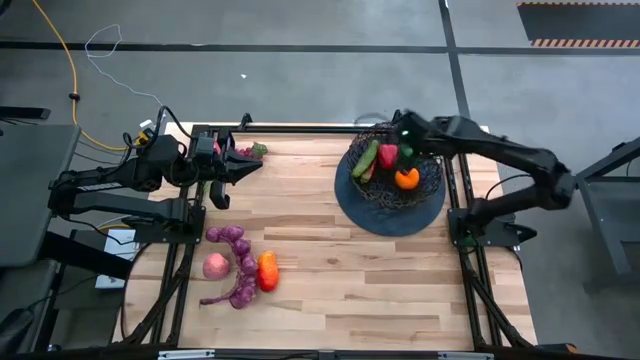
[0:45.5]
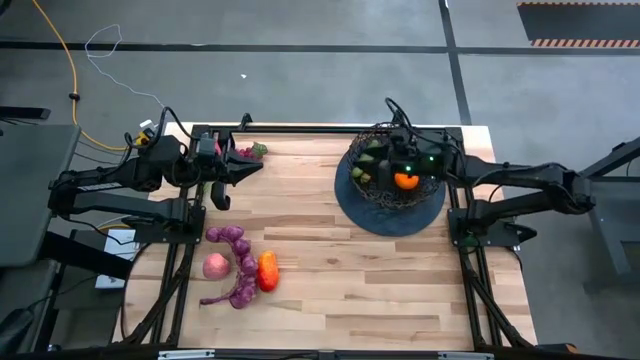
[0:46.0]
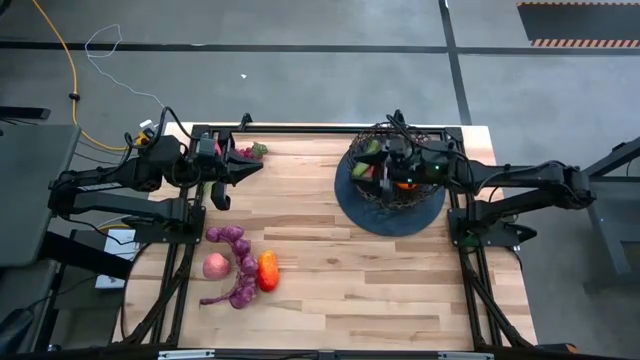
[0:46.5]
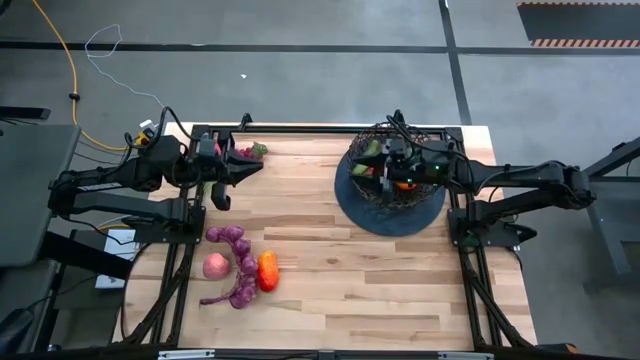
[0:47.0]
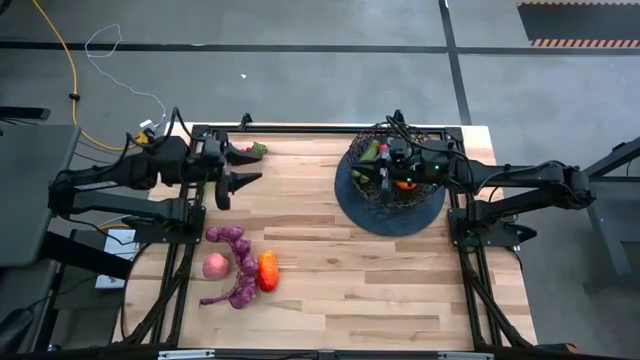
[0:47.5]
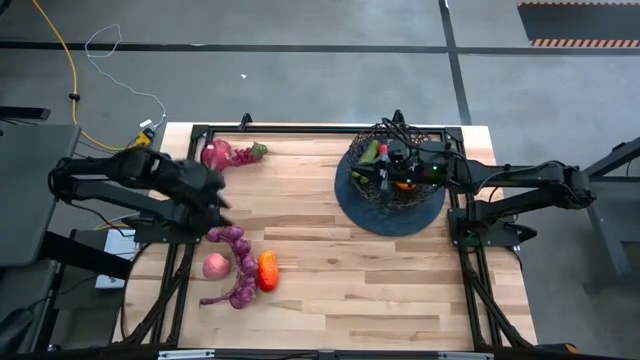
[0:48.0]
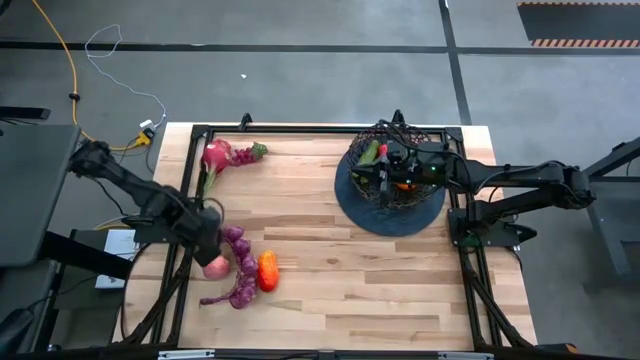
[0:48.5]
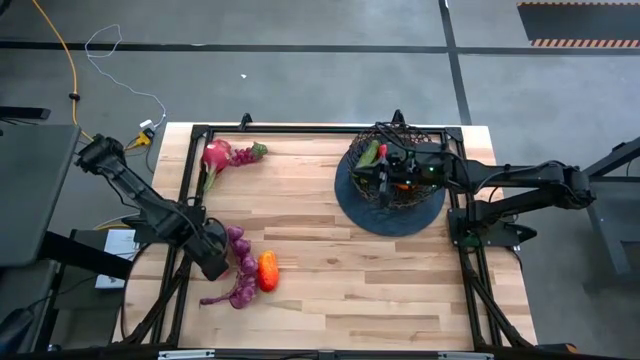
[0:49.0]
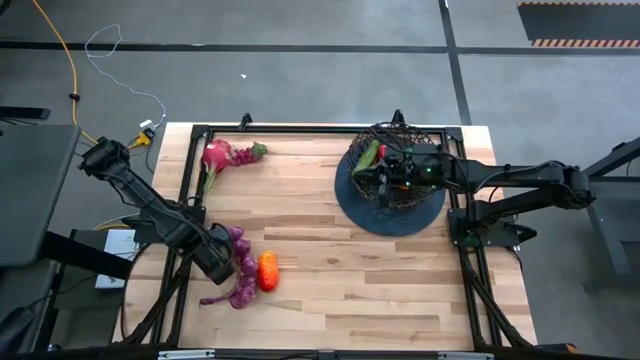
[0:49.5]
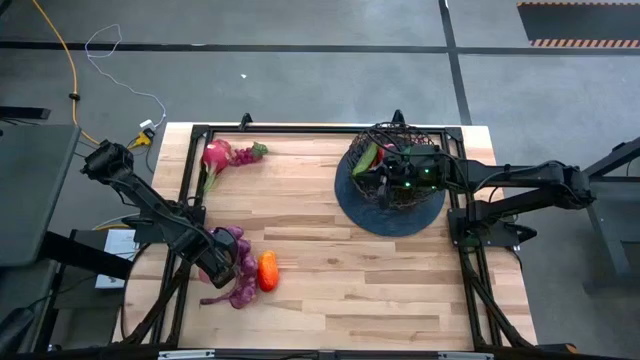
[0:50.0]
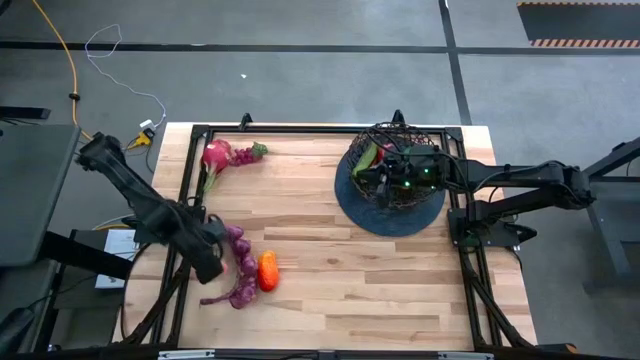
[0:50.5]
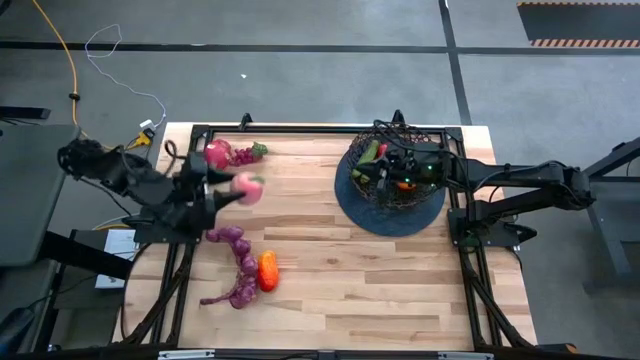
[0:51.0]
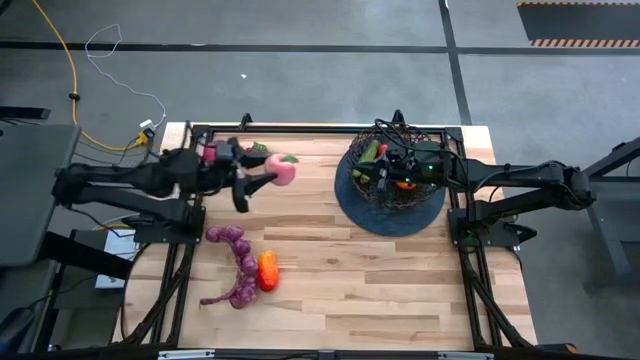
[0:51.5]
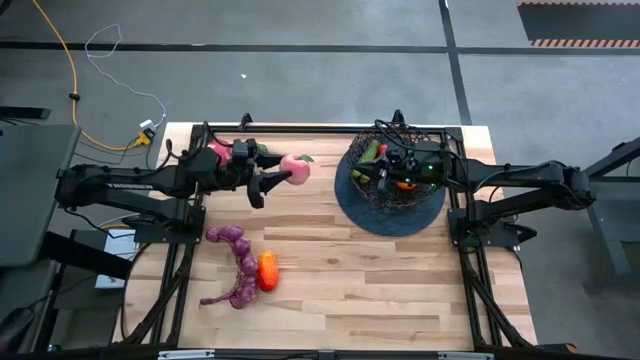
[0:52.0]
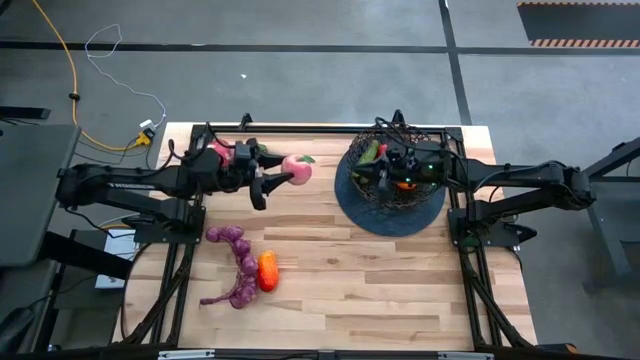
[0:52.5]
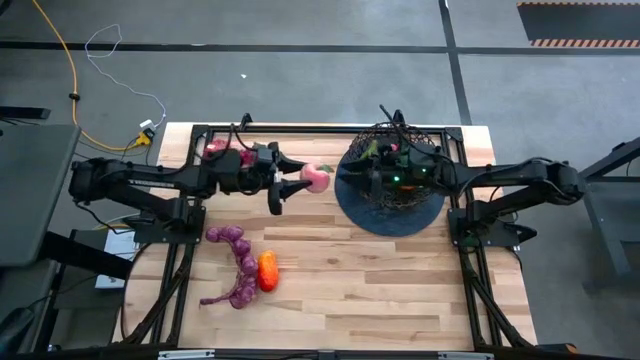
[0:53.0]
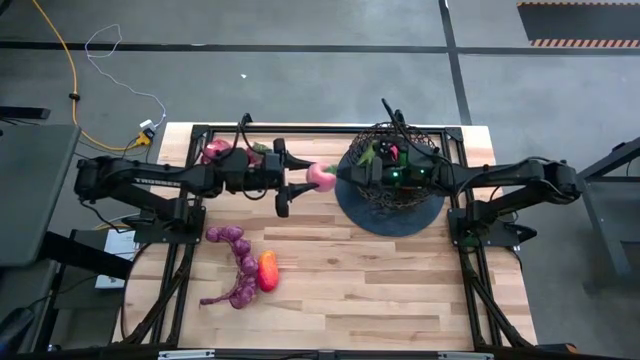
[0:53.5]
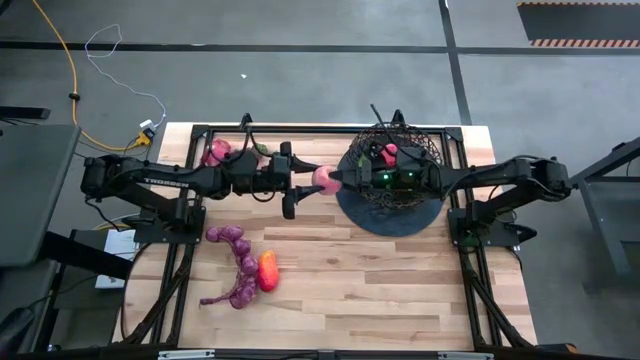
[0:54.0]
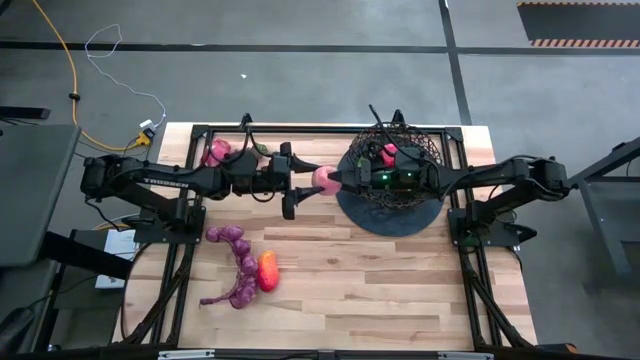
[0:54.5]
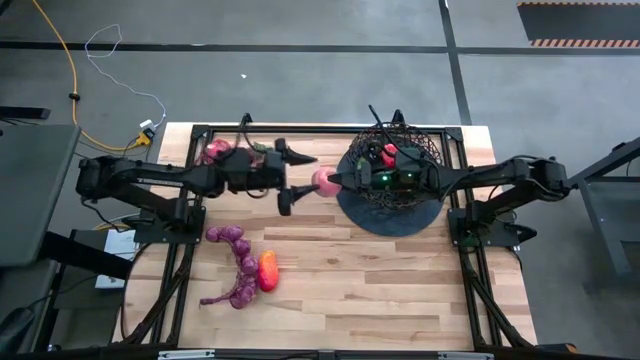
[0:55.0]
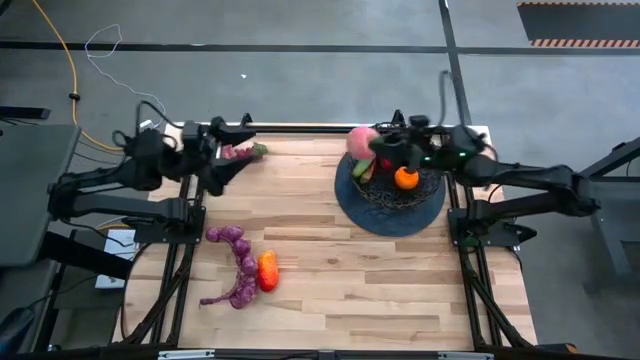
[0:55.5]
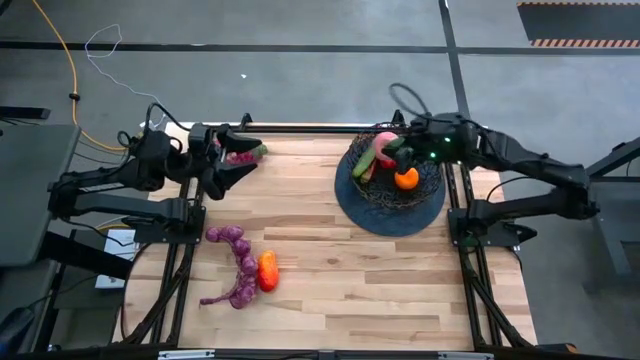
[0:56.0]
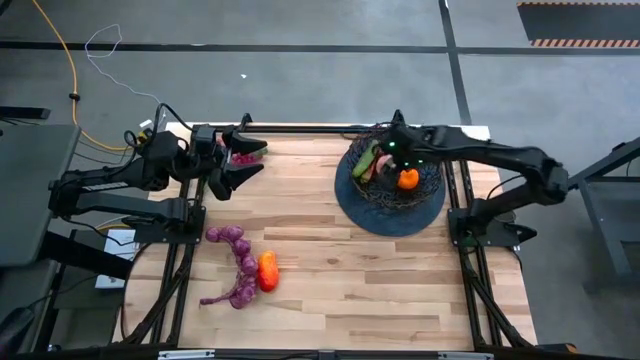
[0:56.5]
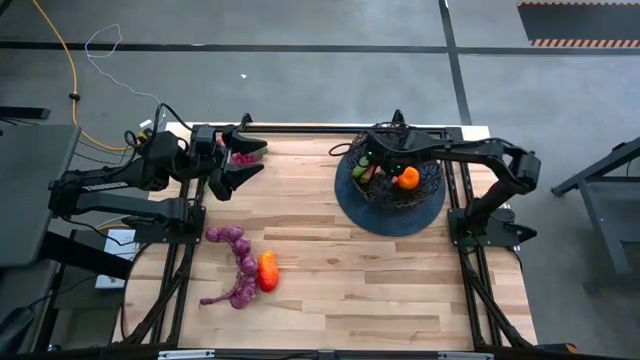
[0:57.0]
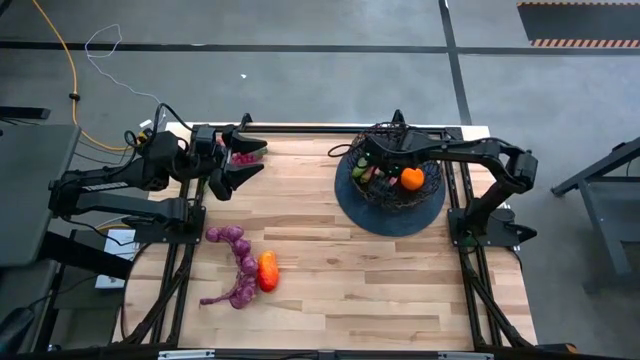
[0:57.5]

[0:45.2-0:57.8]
Task: Build produce basket
Put the peach into the wire basket

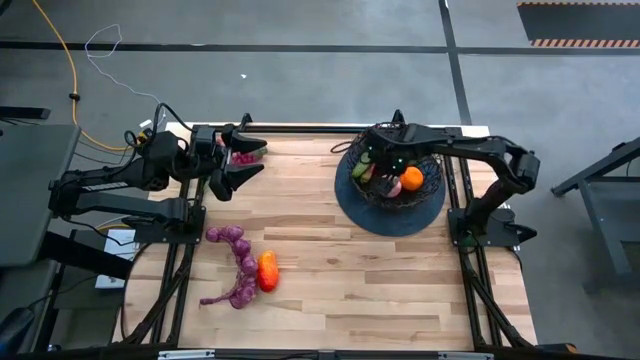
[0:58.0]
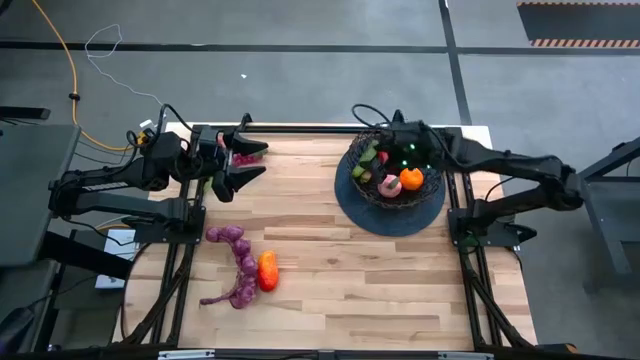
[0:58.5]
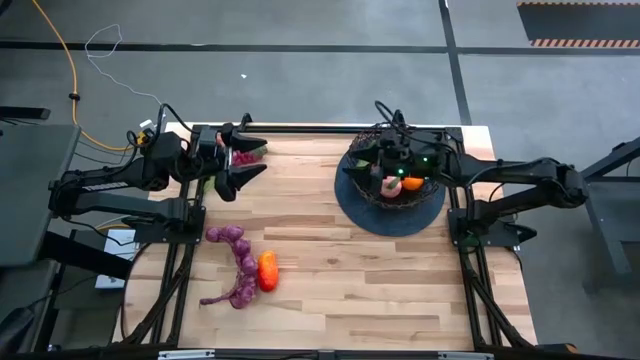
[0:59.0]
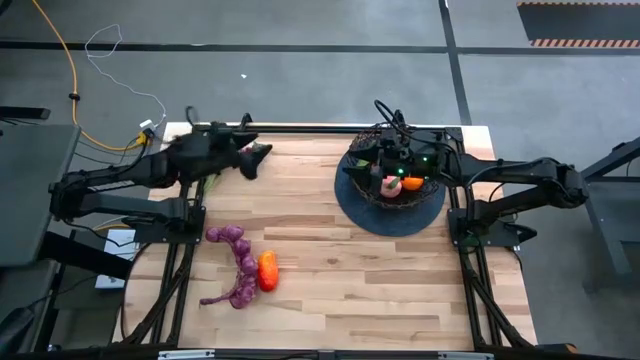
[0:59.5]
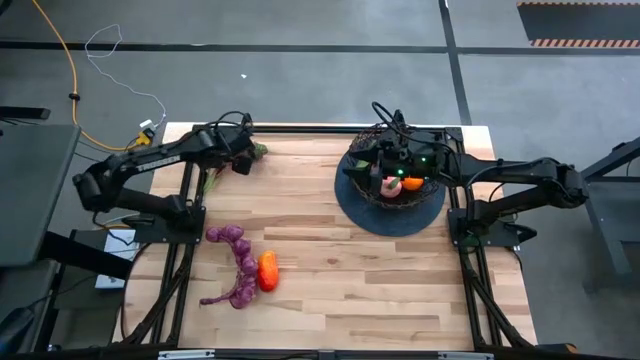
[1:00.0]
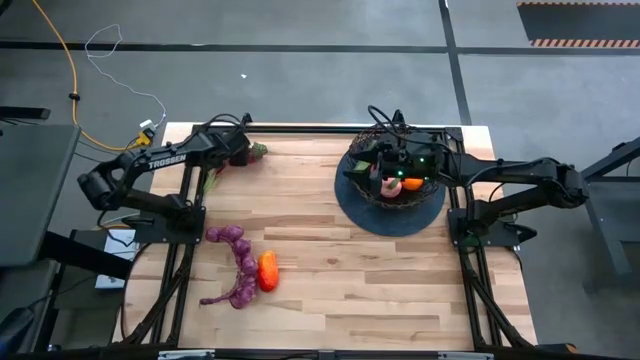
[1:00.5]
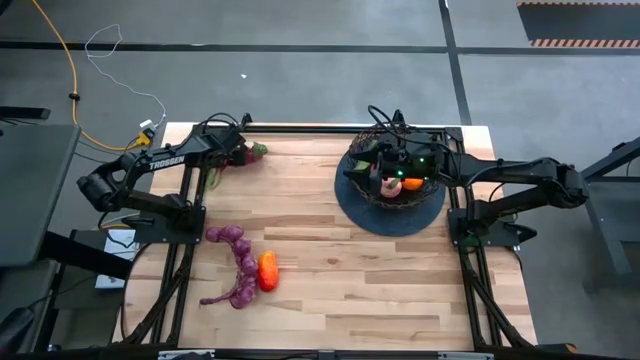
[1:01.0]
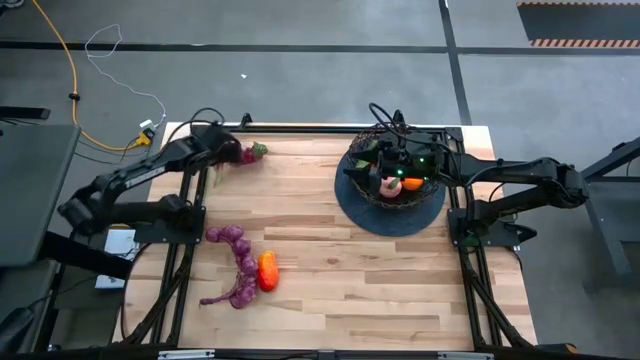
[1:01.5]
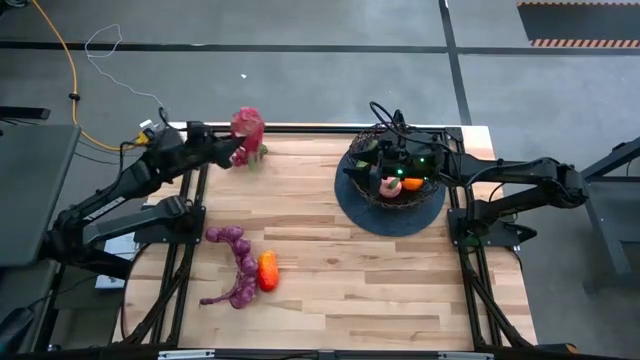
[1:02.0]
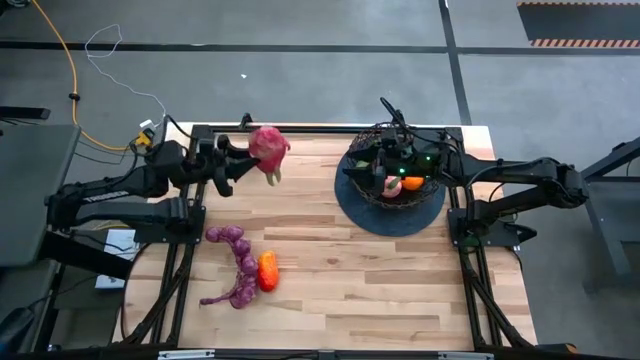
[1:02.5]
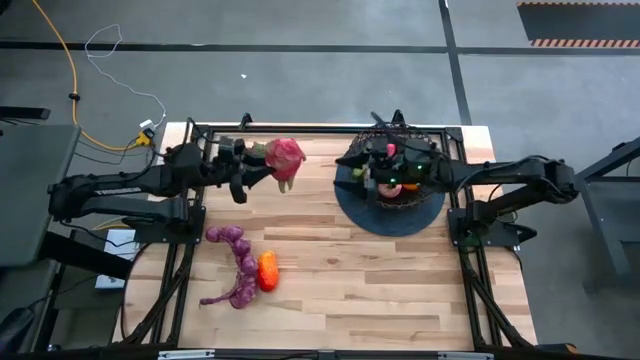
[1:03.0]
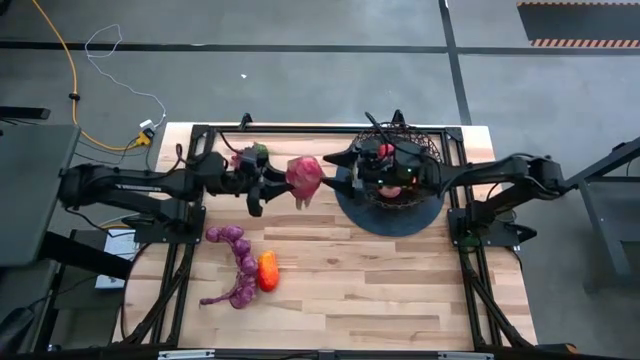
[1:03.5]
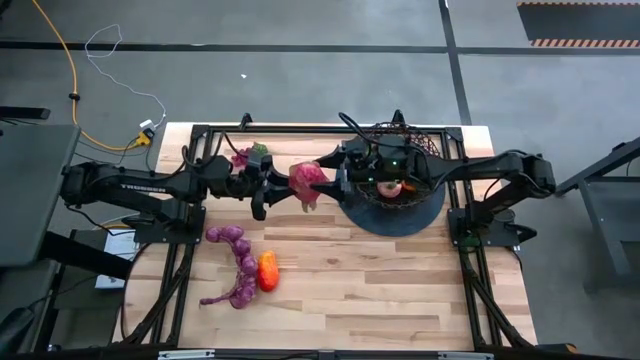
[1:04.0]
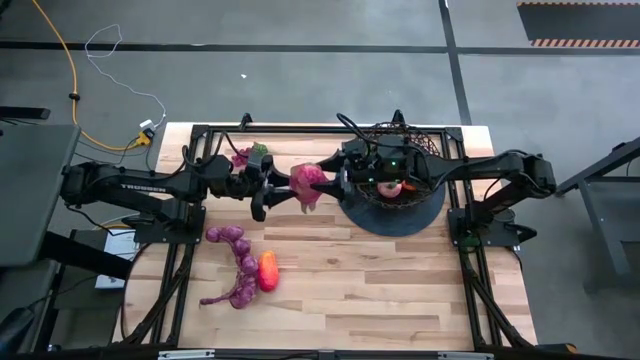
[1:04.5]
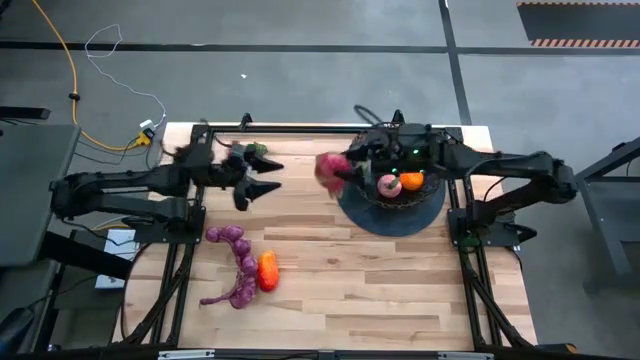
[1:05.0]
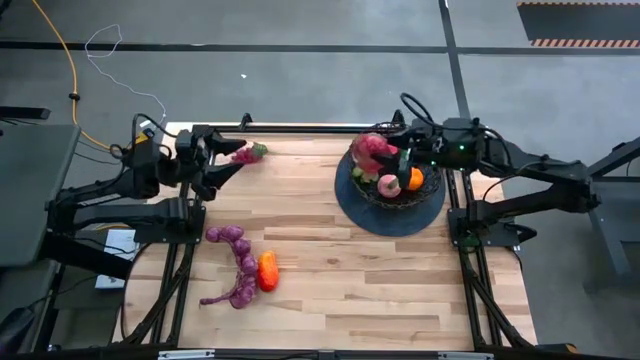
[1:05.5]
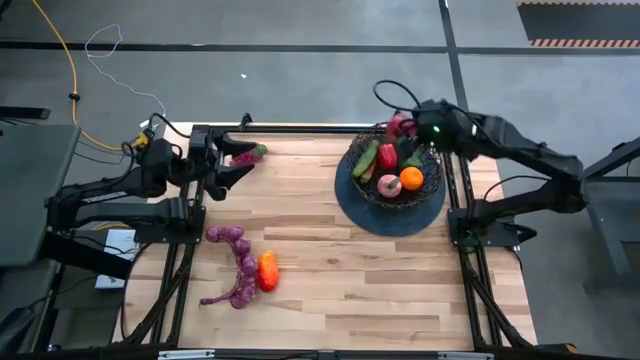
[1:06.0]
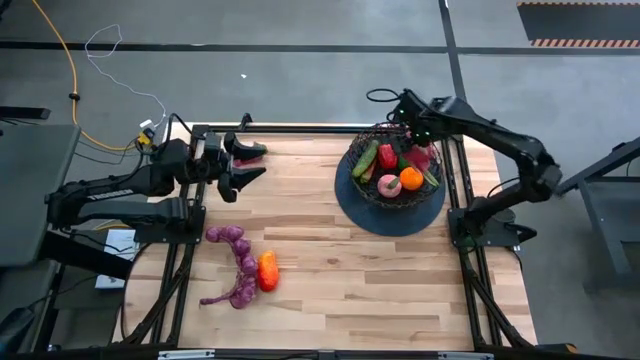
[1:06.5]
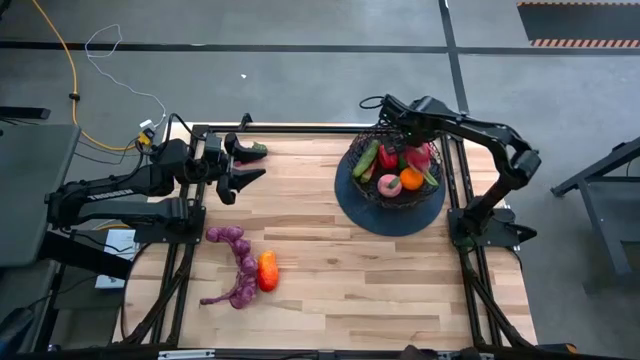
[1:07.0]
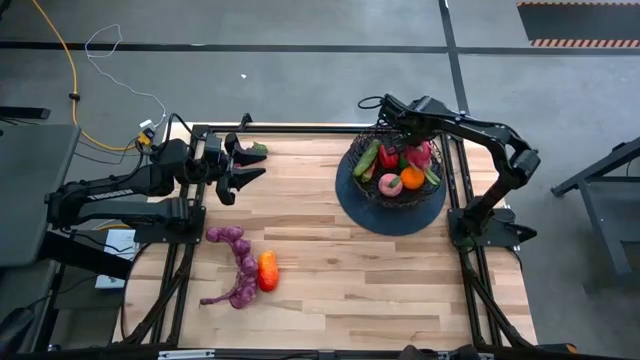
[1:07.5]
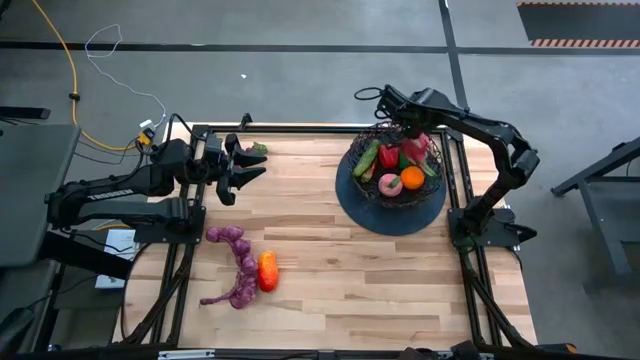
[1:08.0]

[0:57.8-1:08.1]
Put the dragon fruit into the wire basket
